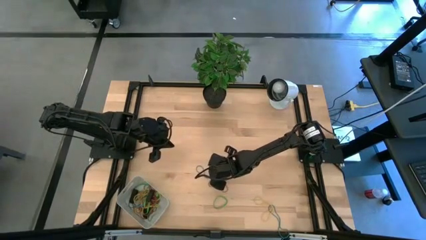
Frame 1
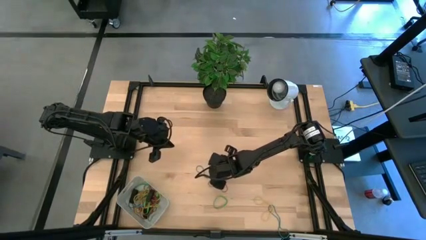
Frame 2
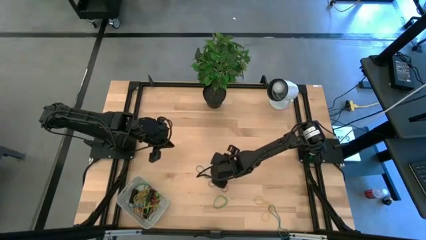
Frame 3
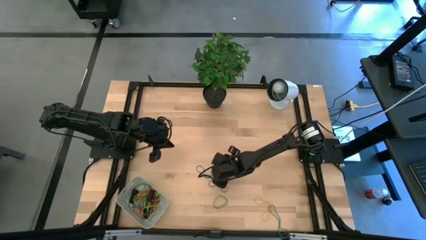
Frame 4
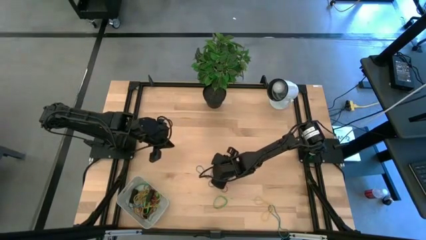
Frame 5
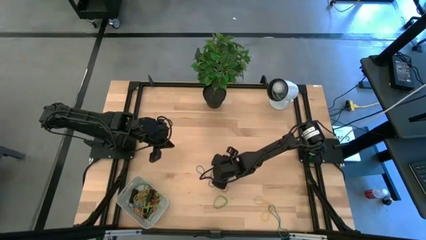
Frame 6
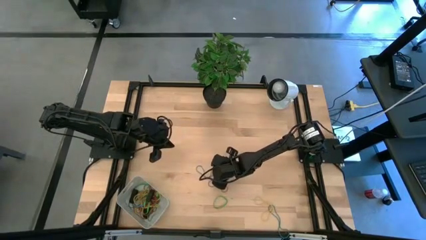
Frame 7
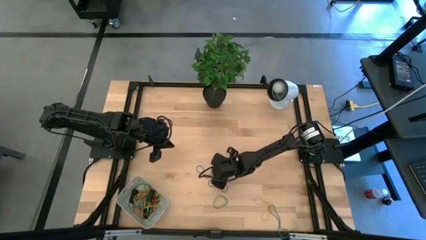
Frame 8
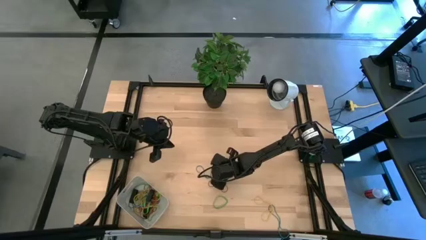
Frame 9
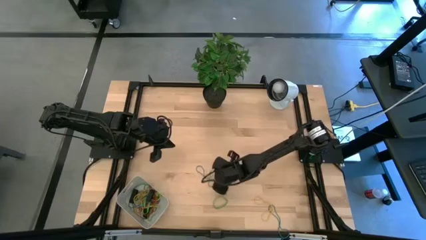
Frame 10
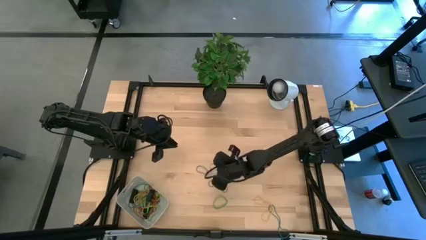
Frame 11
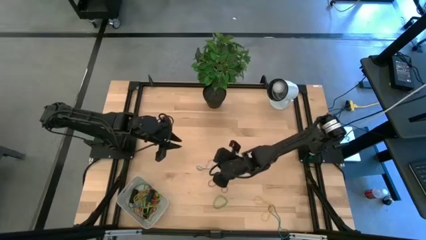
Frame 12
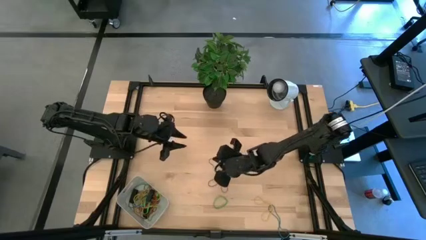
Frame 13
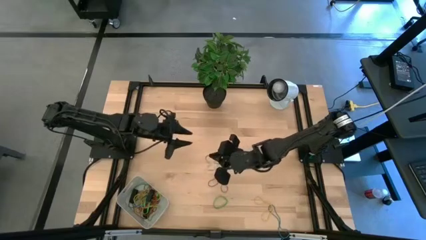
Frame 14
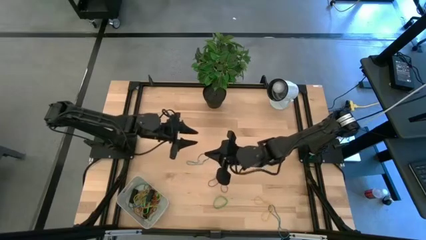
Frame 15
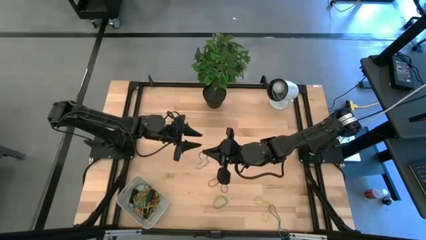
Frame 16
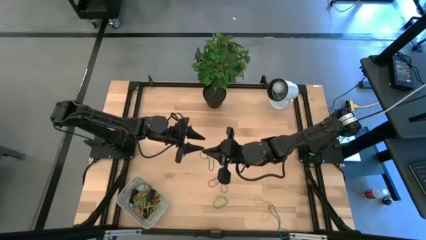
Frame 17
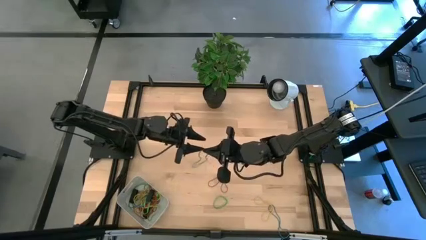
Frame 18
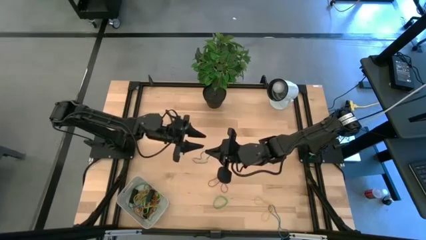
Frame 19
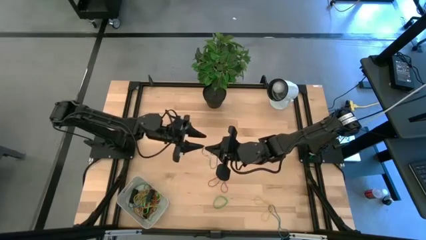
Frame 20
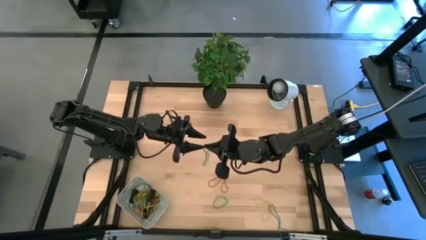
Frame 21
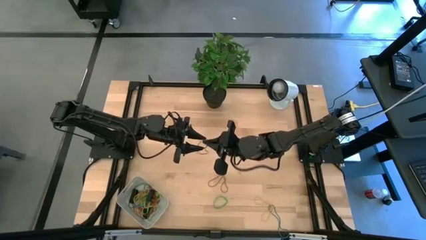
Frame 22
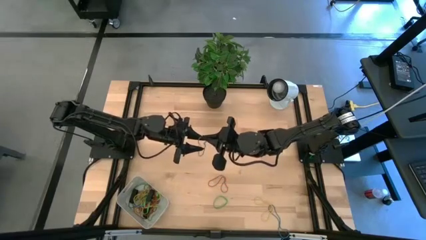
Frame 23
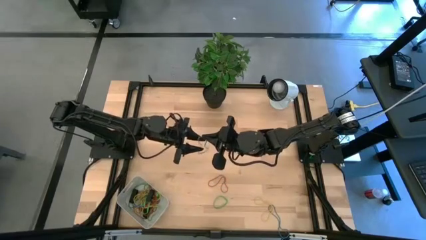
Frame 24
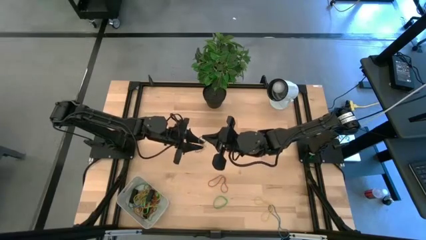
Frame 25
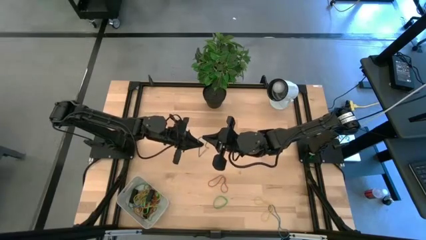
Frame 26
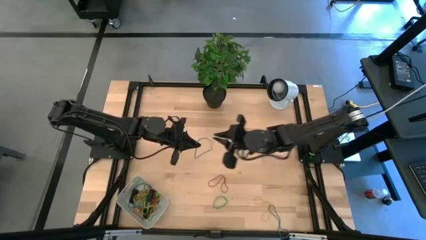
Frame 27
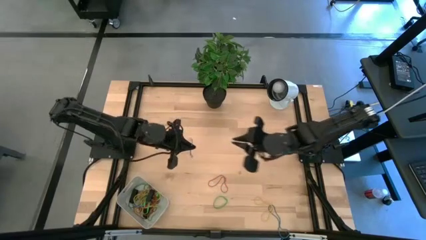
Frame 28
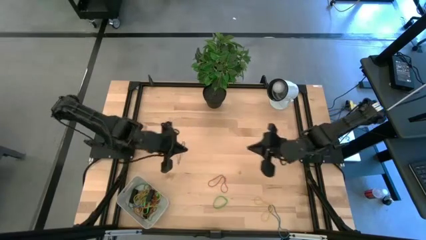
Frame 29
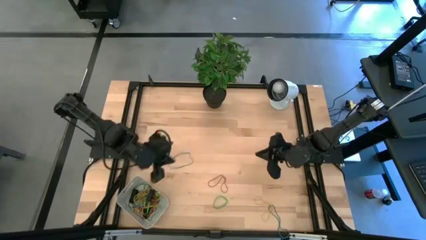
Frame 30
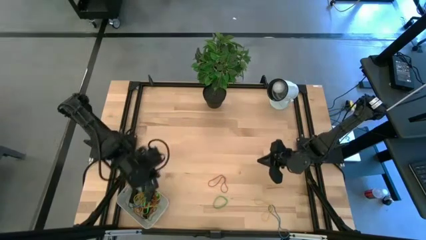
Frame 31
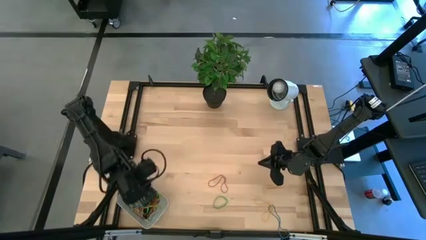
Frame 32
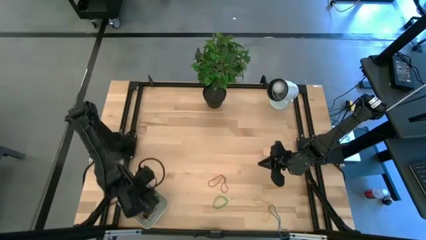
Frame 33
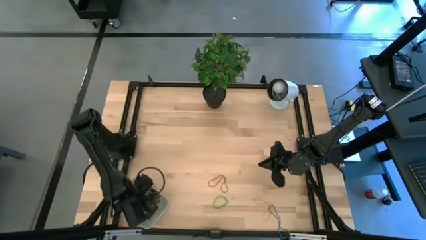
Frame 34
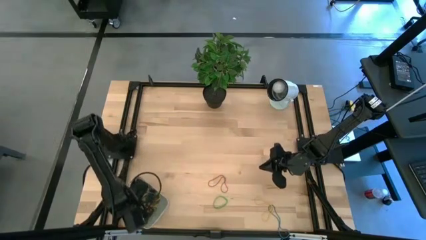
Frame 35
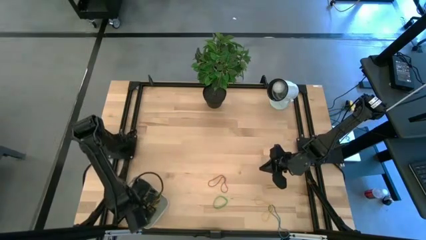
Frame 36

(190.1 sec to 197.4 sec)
Task: Pick and place rubber bands into bin
Put the top blue rubber band into the gray bin

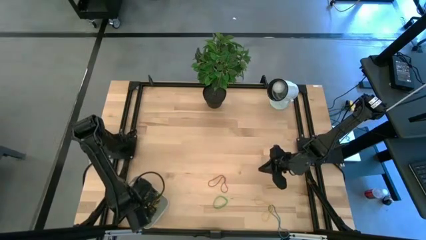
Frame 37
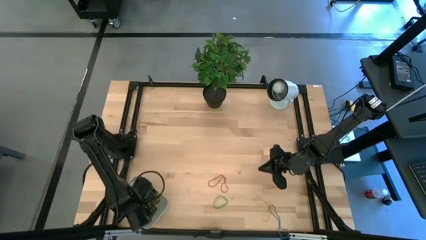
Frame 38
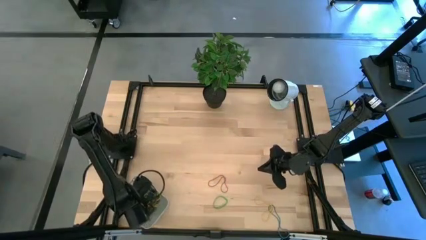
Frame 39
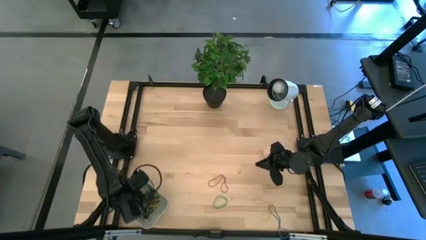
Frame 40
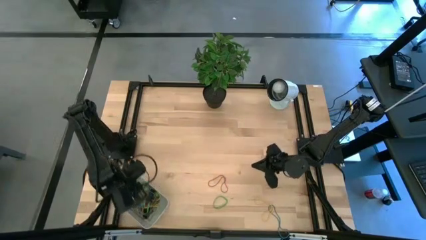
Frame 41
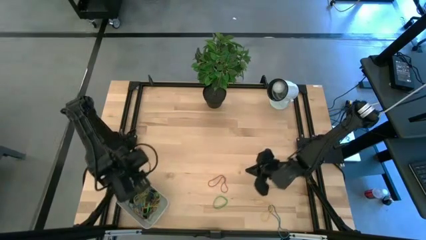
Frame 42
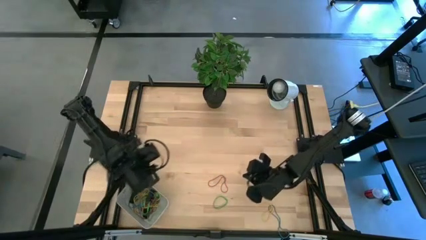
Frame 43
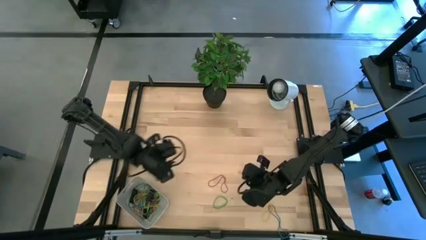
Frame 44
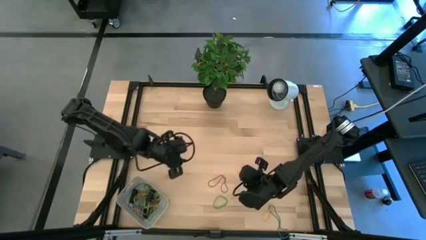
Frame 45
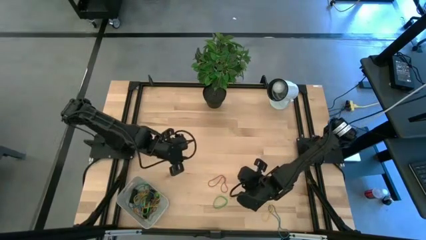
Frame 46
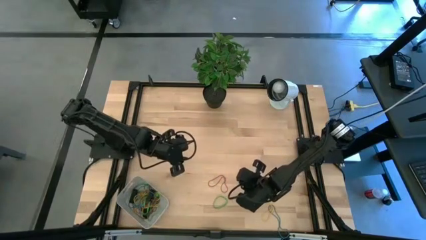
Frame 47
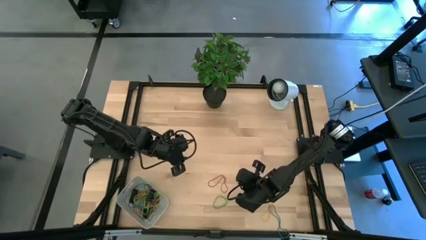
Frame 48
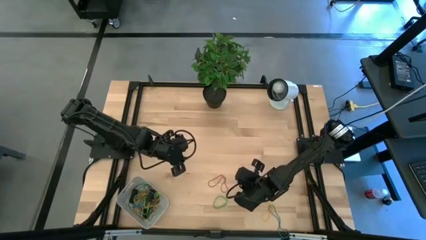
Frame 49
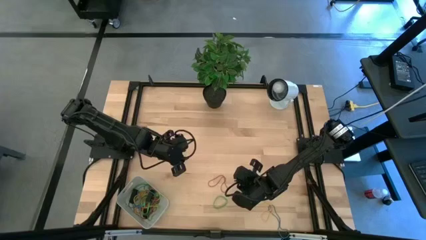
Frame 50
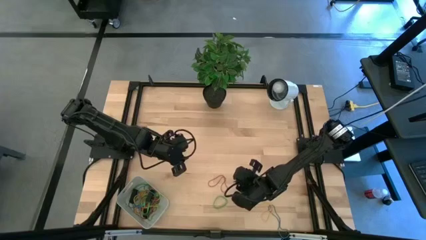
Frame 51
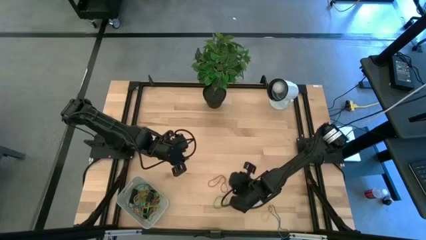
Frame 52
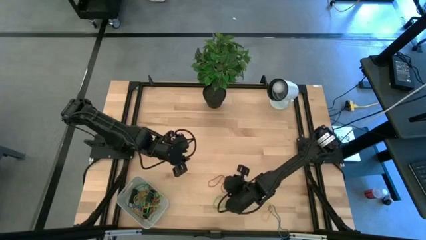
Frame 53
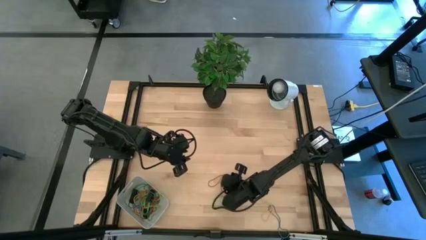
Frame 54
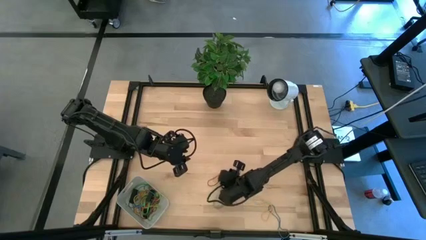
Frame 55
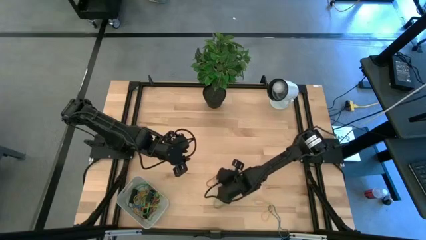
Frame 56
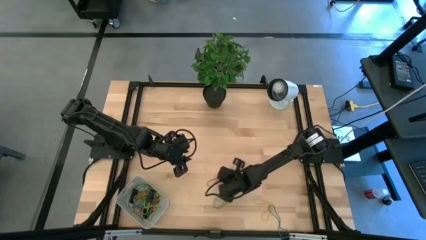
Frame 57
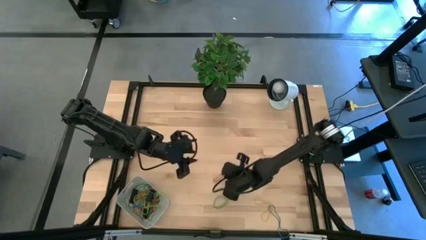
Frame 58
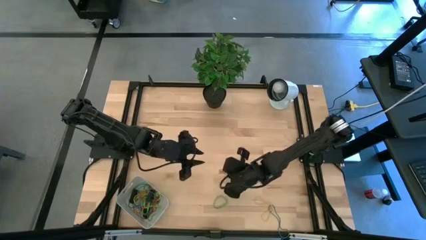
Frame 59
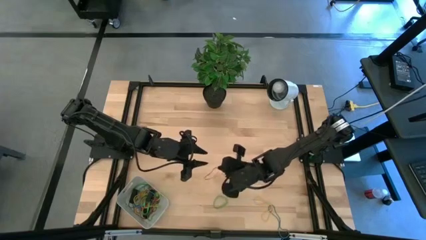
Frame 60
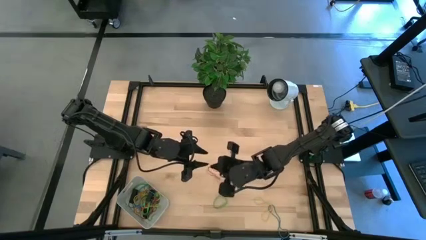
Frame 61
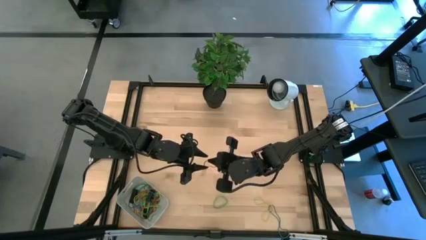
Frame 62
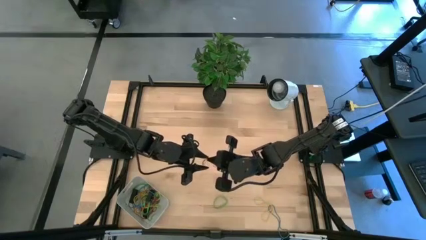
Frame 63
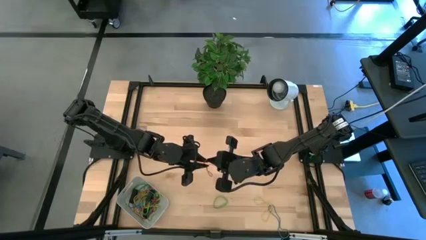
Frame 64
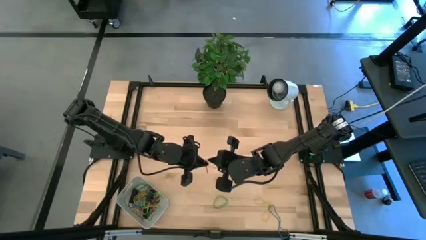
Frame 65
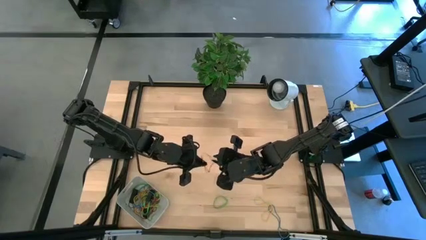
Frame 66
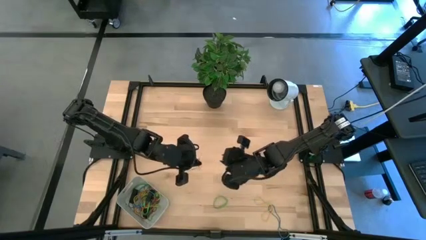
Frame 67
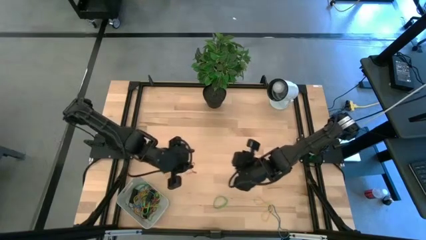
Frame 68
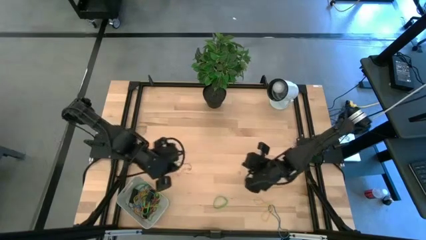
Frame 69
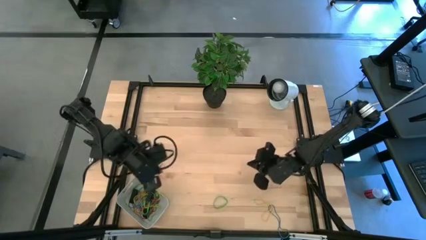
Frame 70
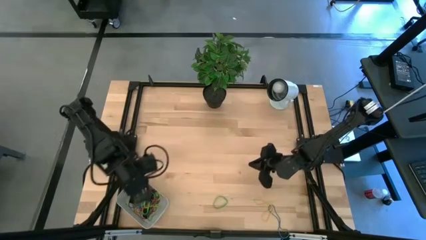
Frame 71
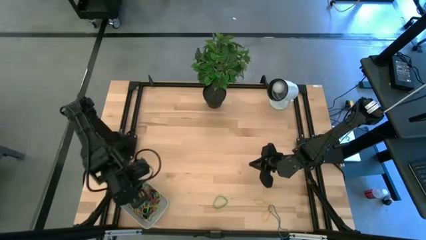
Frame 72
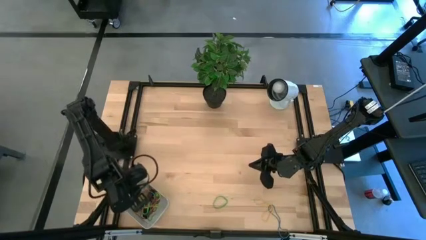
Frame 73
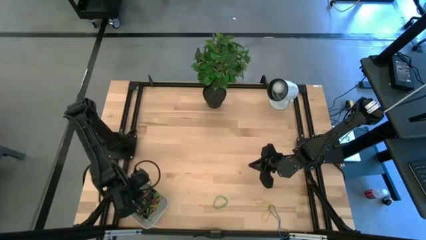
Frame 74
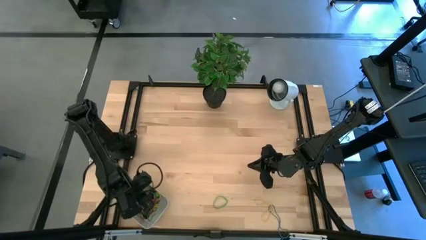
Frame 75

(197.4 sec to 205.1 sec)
Put the red rubber band into the gray bin

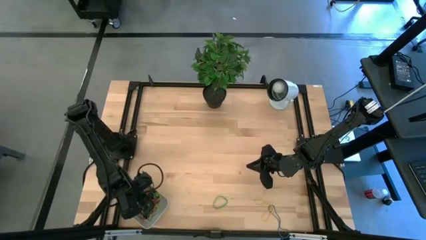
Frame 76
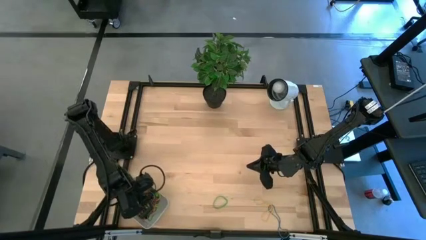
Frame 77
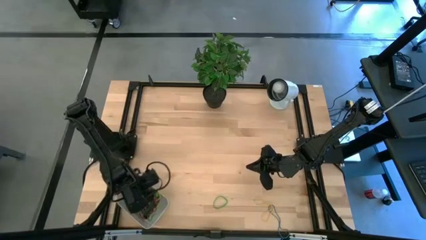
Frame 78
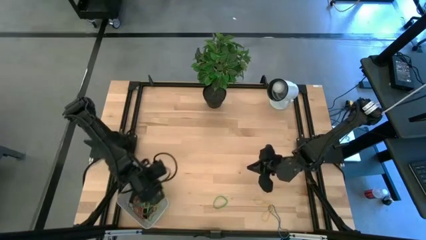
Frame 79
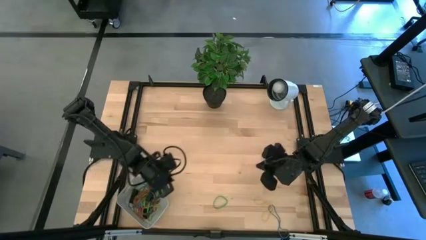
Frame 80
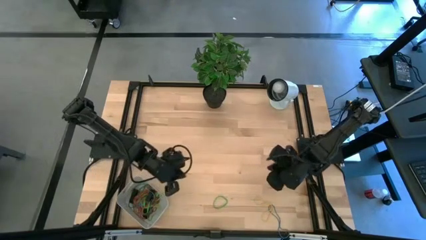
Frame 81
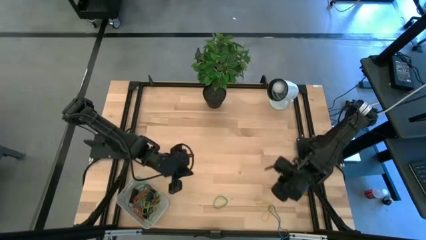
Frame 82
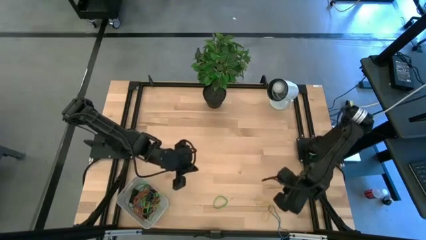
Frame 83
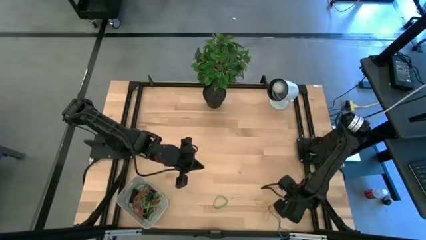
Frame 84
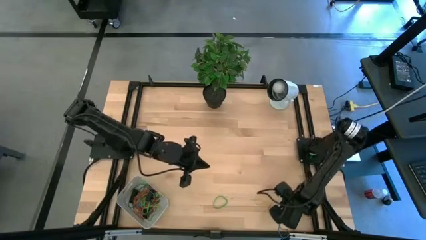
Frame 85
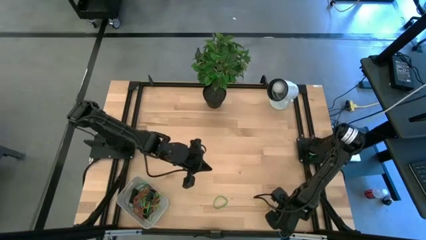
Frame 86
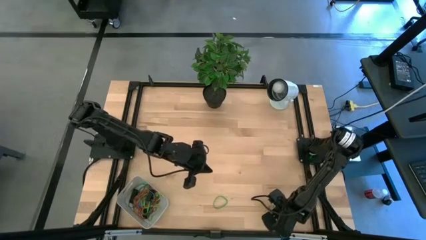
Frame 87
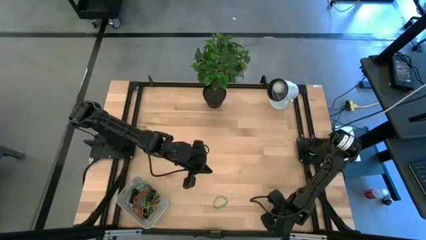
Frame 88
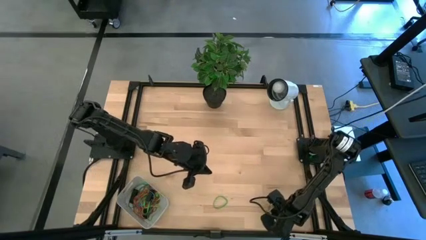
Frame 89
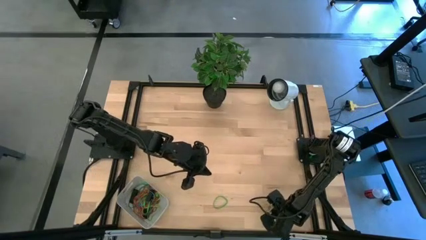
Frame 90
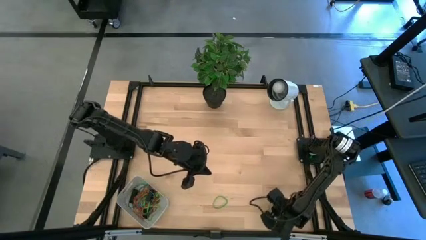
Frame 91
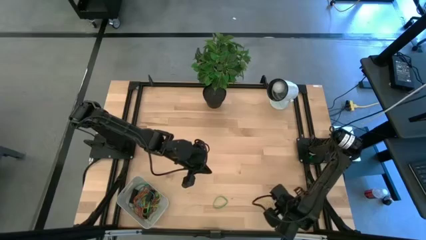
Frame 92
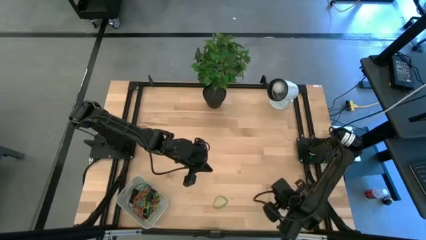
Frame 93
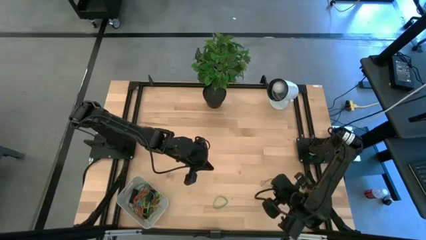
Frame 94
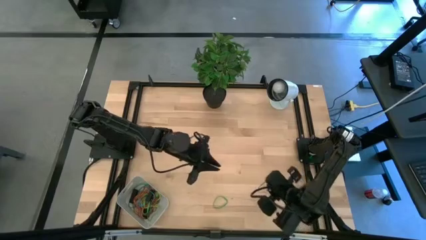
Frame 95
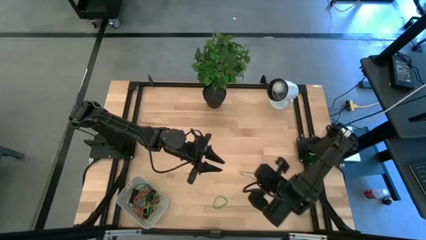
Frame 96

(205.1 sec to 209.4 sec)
Put the blue rubber band into the gray bin
